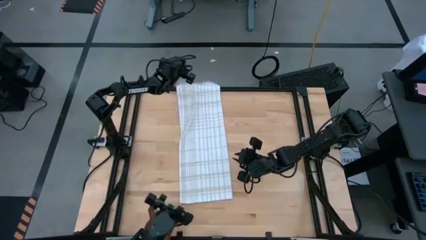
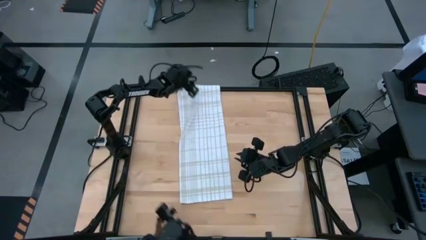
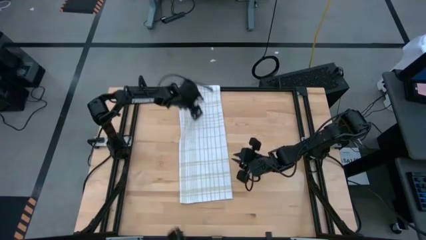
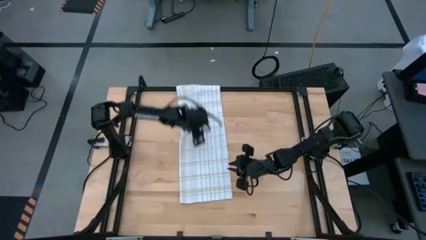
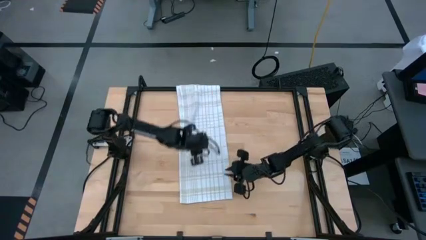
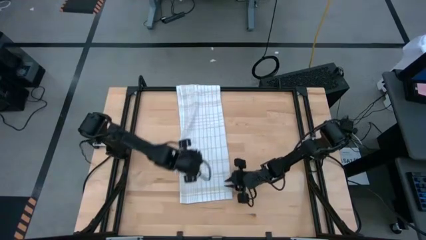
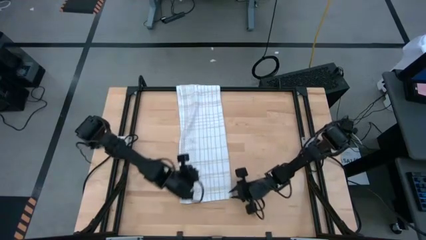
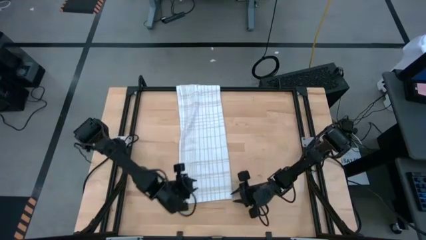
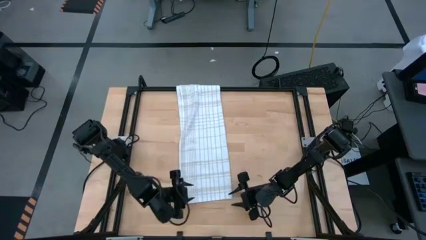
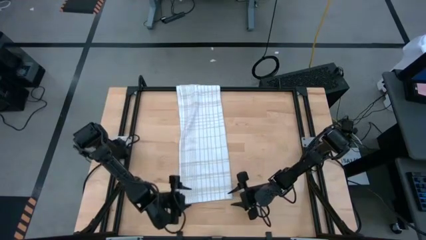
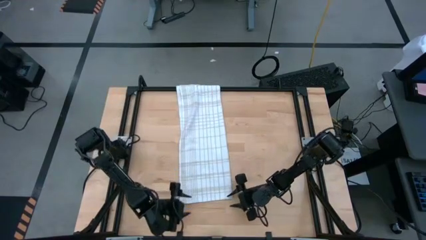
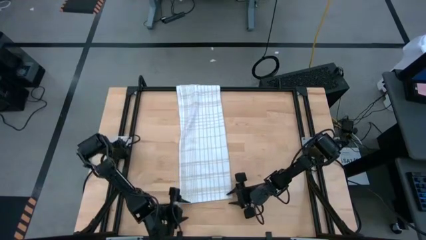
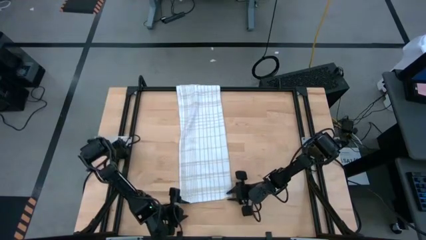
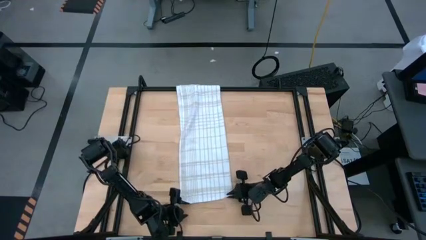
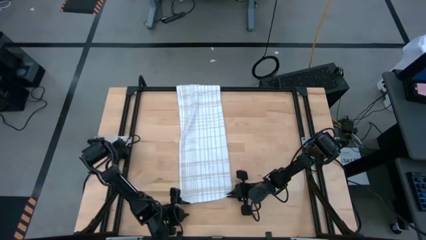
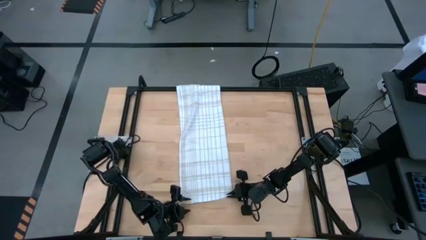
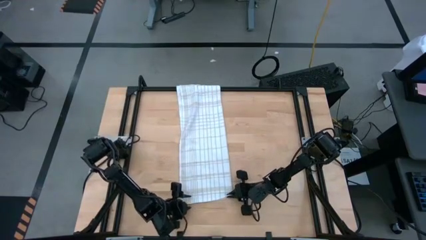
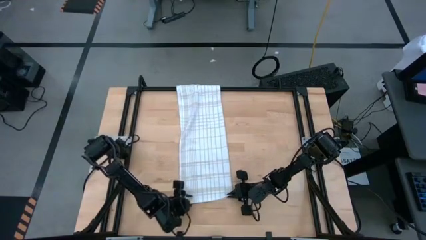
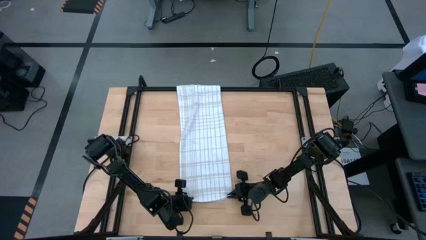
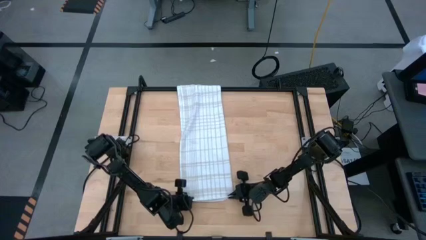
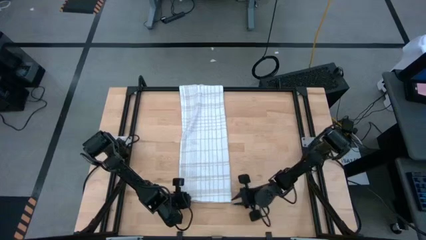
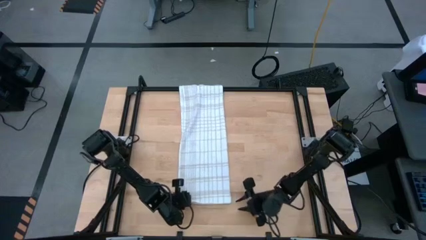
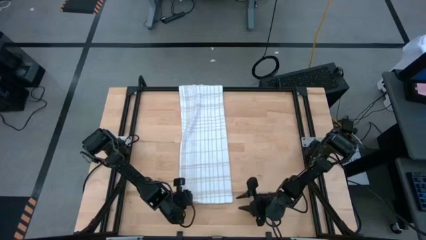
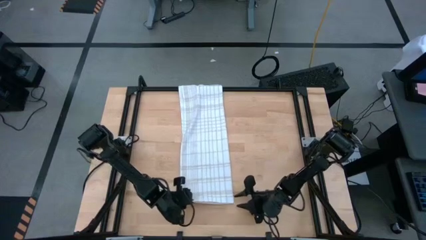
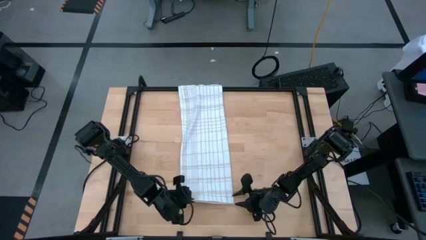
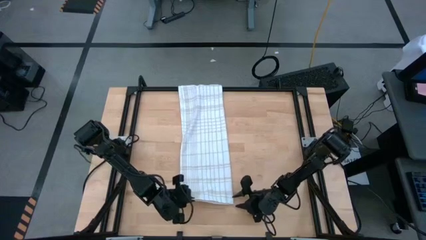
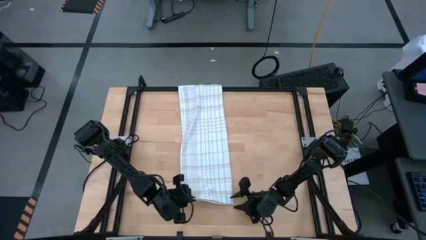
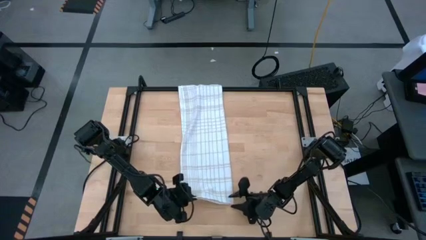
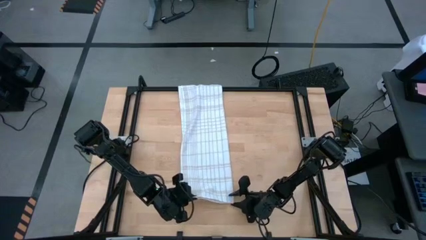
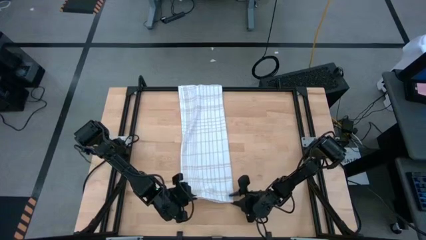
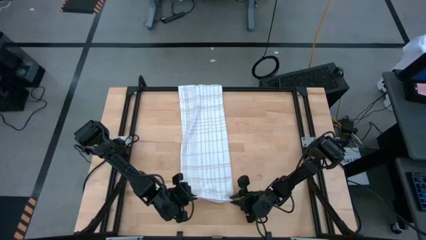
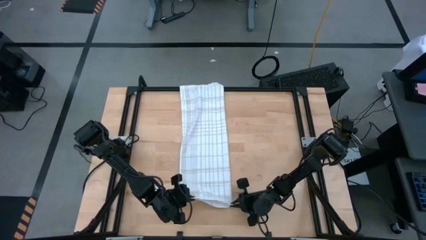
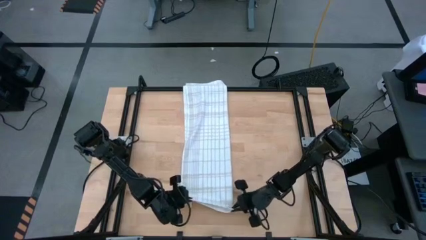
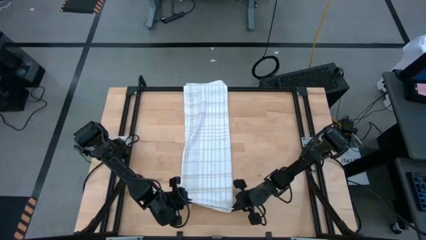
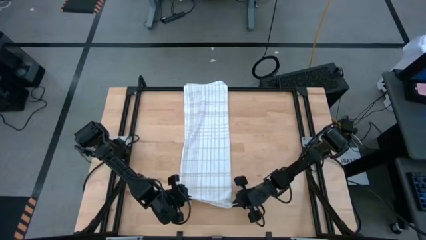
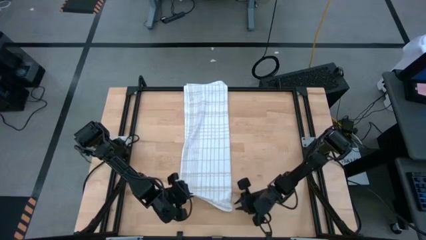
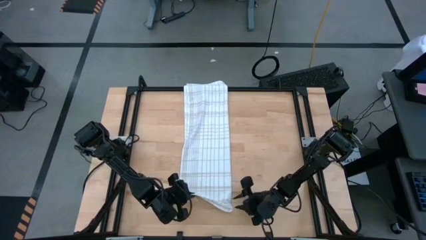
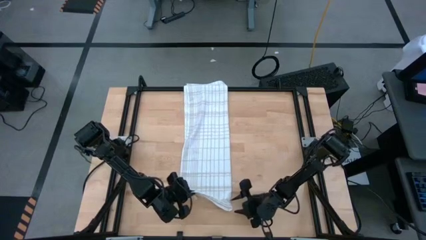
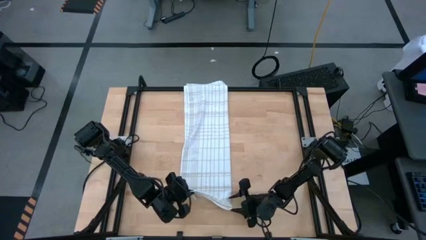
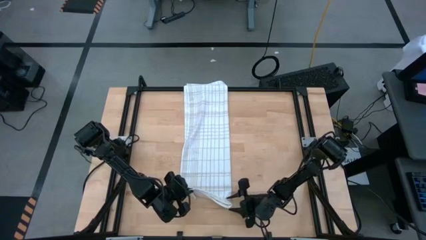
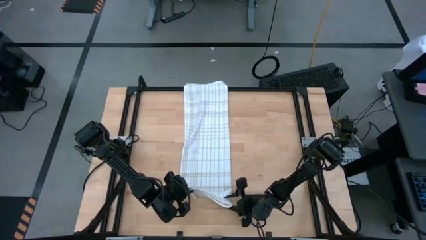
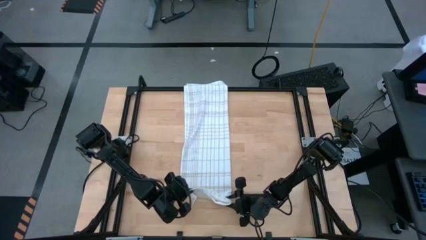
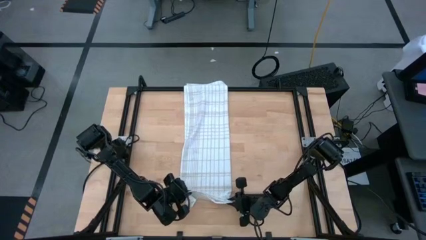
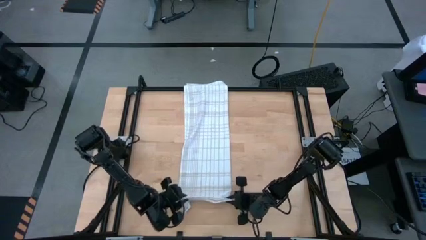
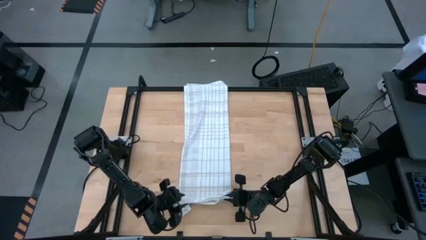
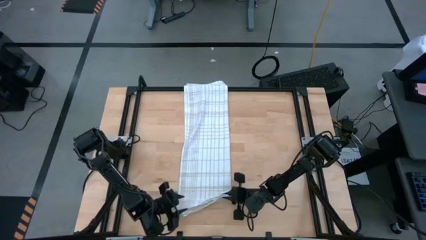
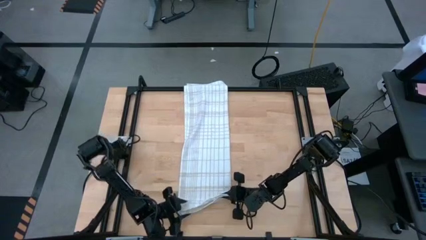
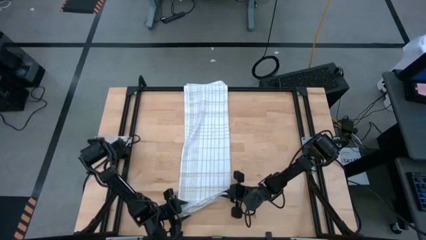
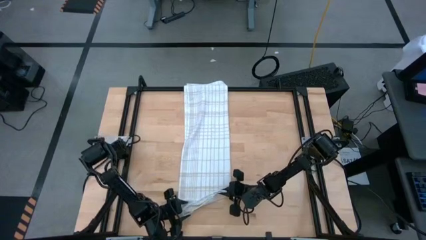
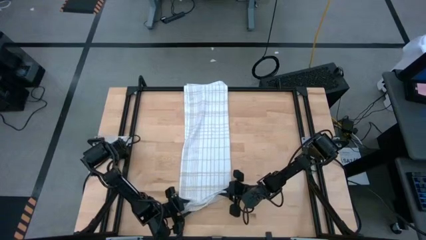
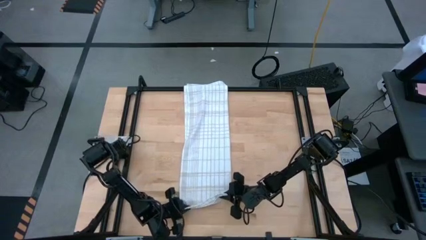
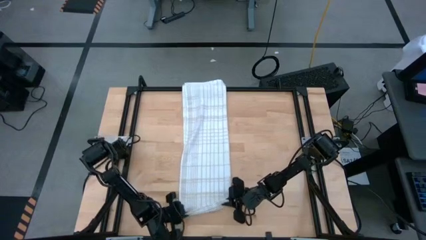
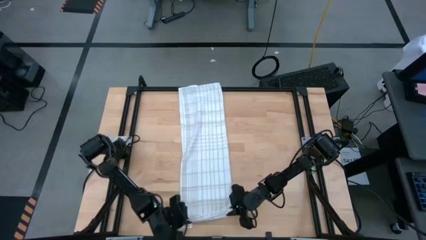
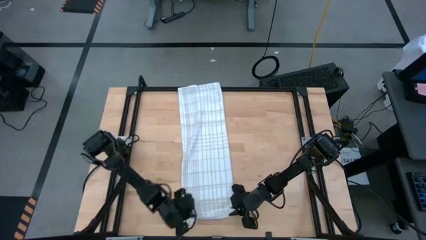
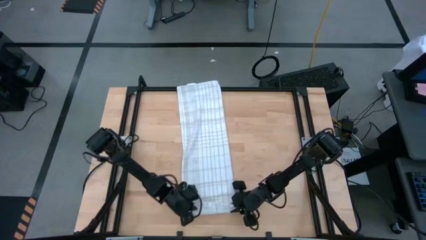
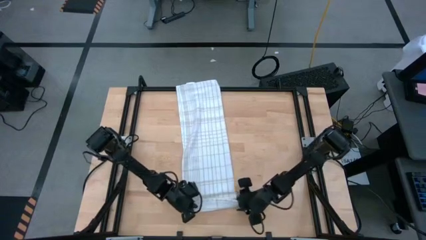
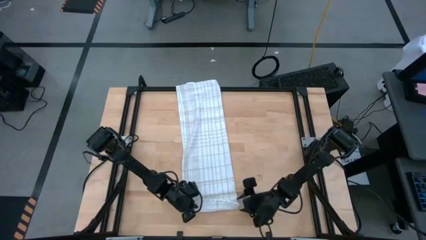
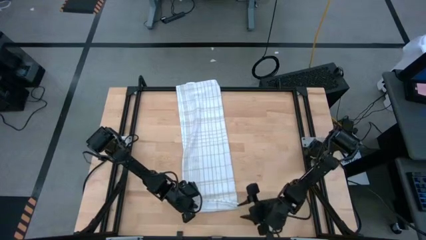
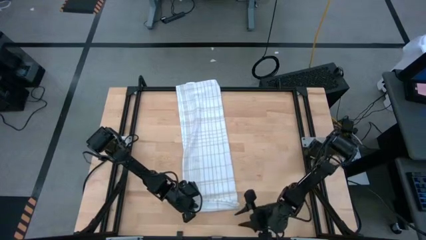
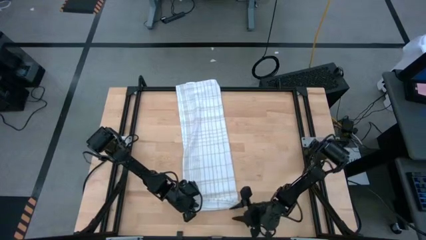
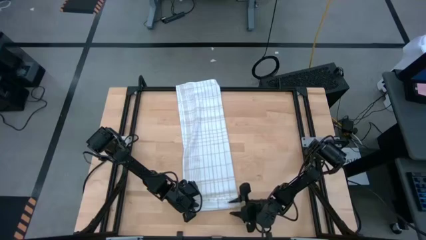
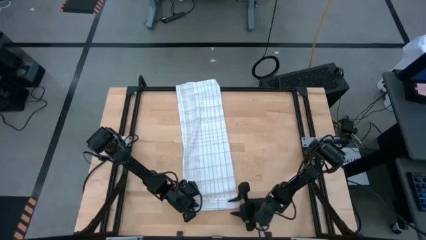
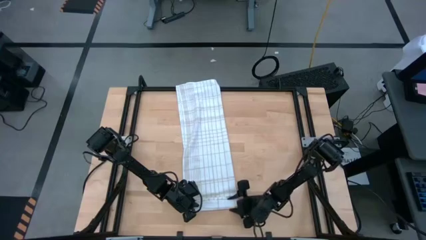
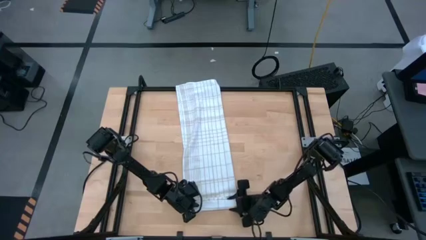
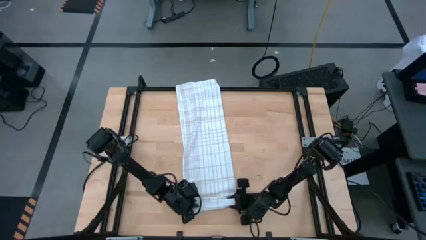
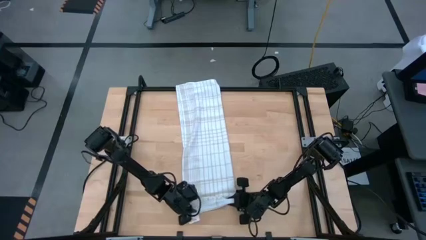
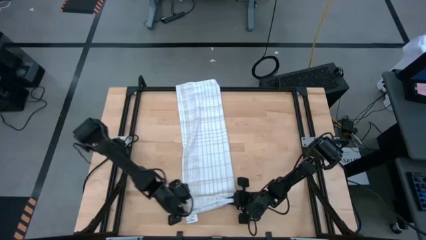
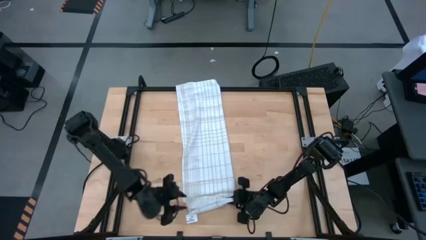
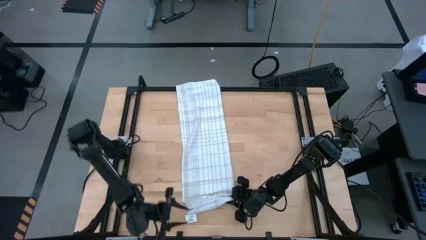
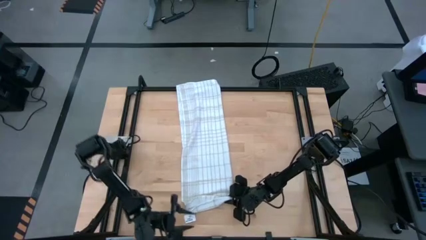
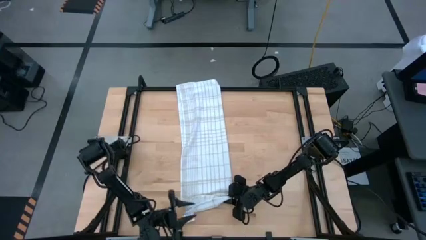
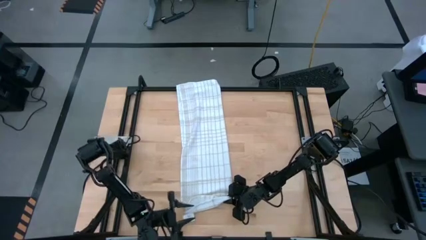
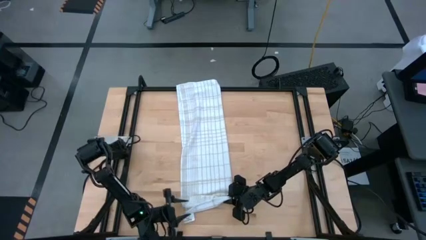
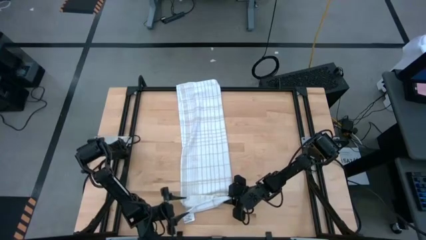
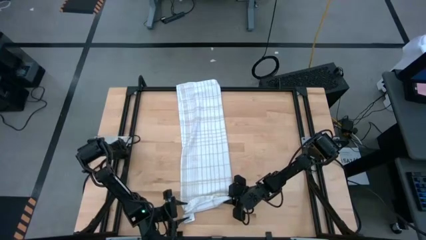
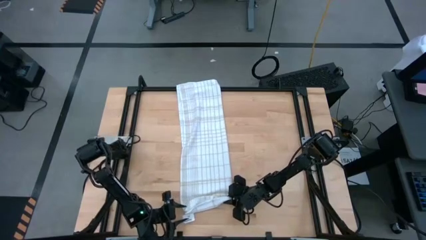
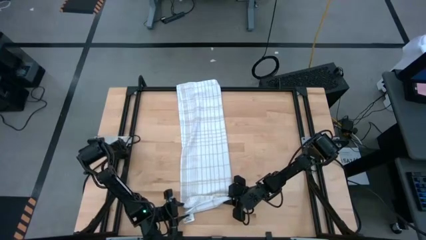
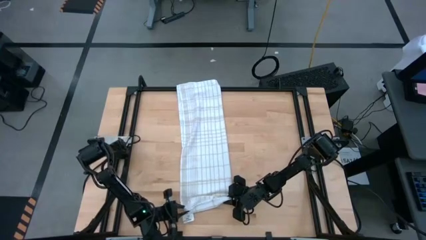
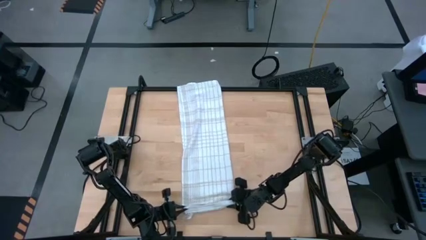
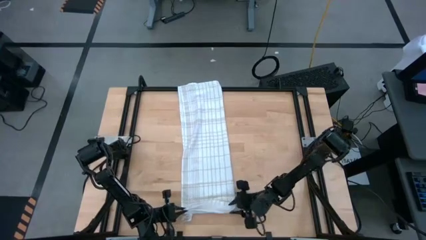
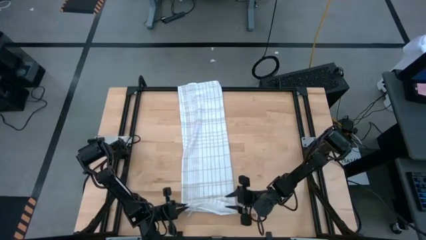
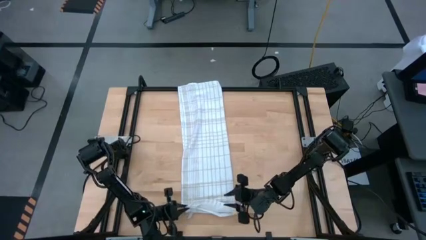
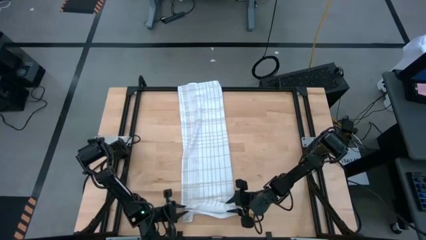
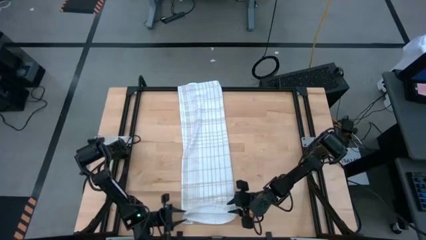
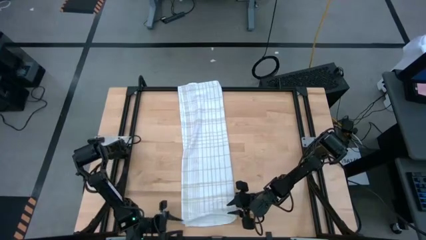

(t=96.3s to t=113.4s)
Task: Roll towel
Roll the white towel
